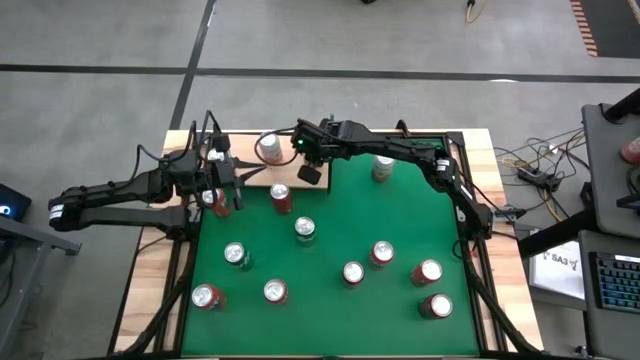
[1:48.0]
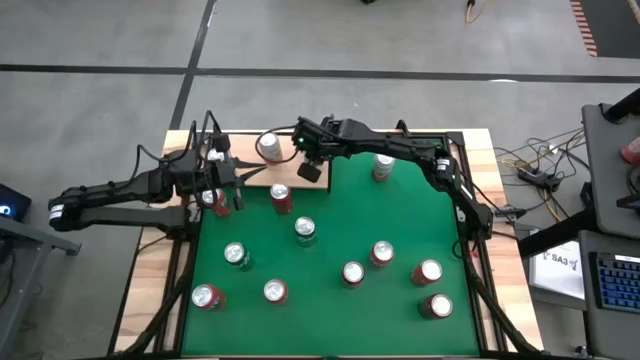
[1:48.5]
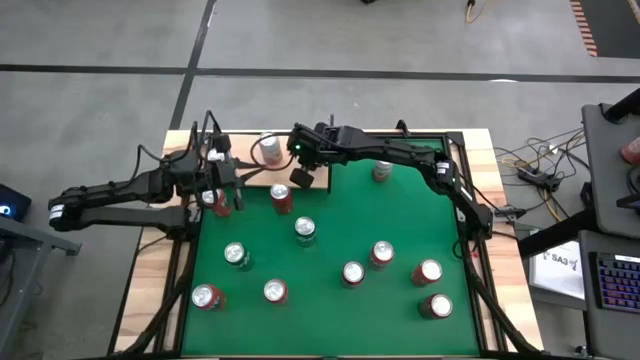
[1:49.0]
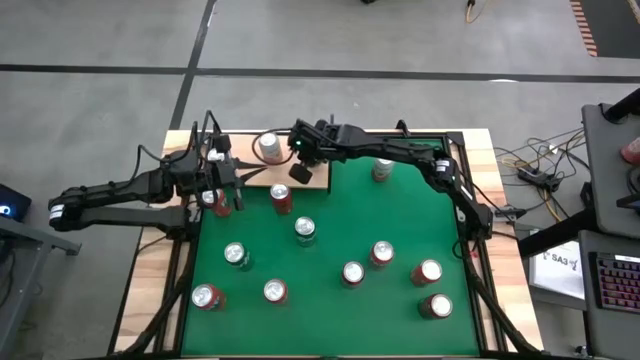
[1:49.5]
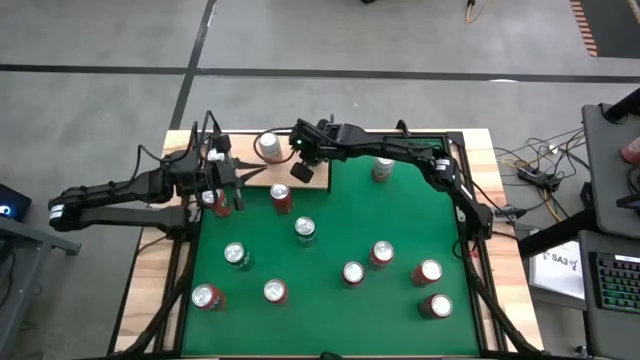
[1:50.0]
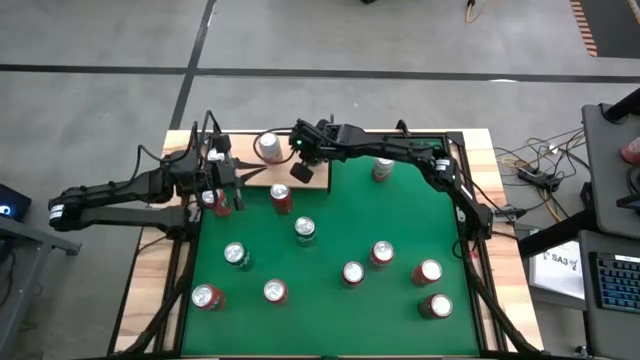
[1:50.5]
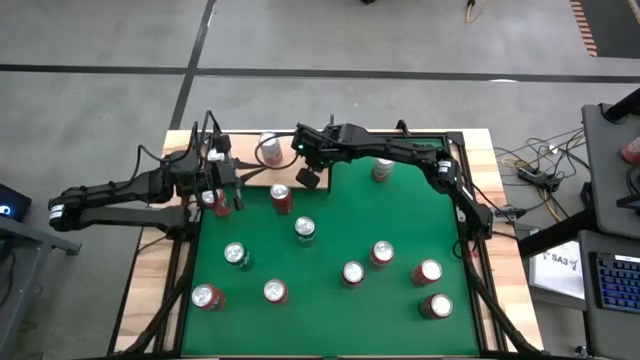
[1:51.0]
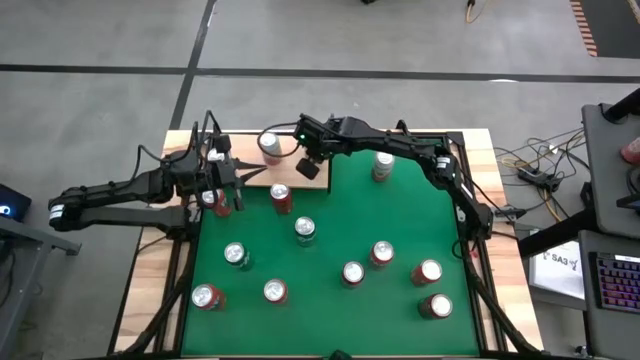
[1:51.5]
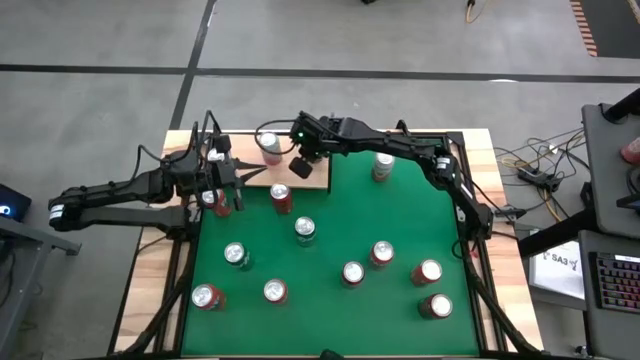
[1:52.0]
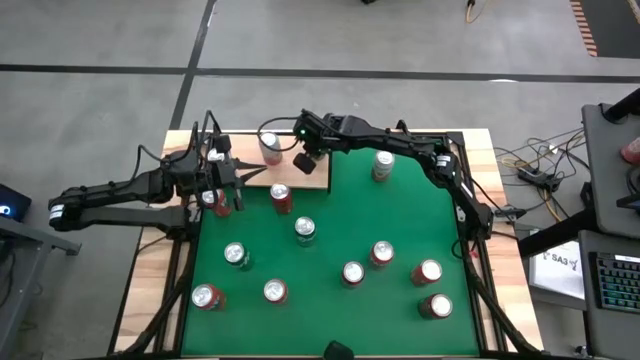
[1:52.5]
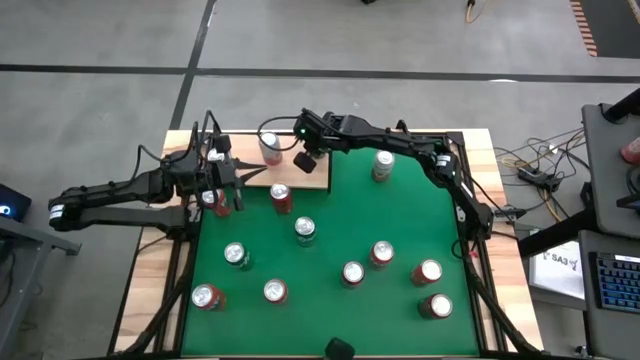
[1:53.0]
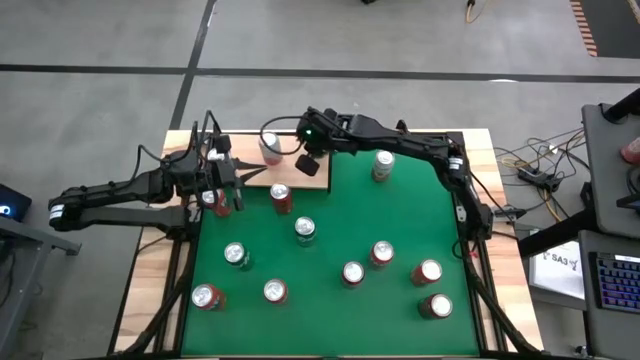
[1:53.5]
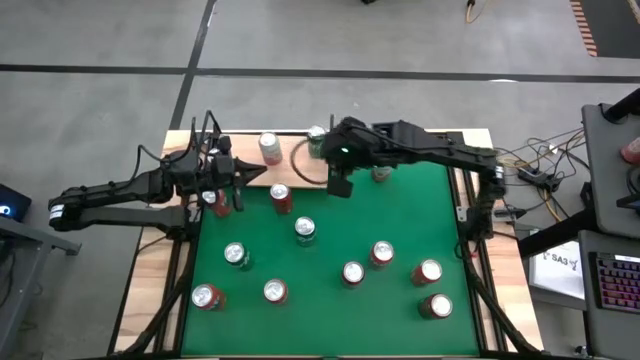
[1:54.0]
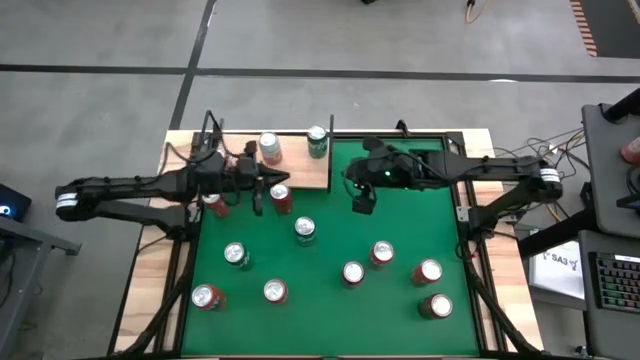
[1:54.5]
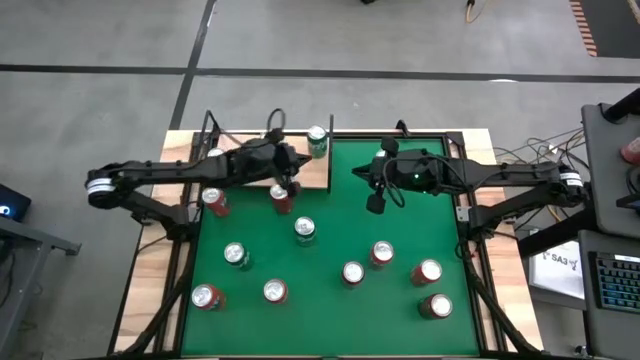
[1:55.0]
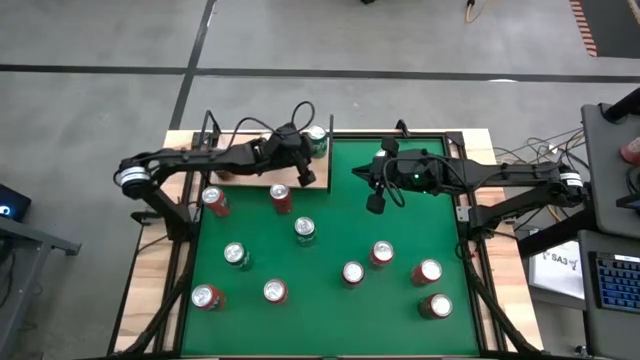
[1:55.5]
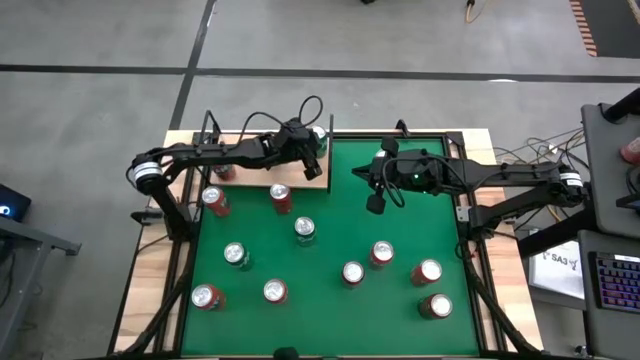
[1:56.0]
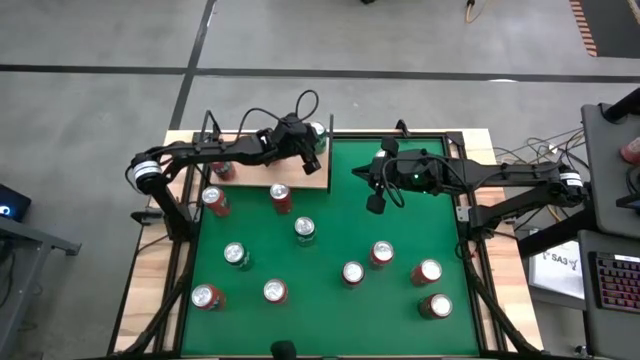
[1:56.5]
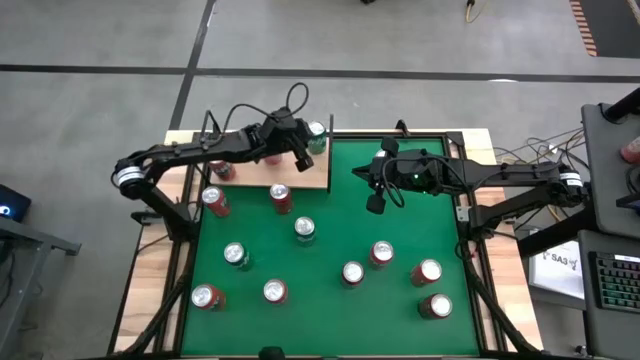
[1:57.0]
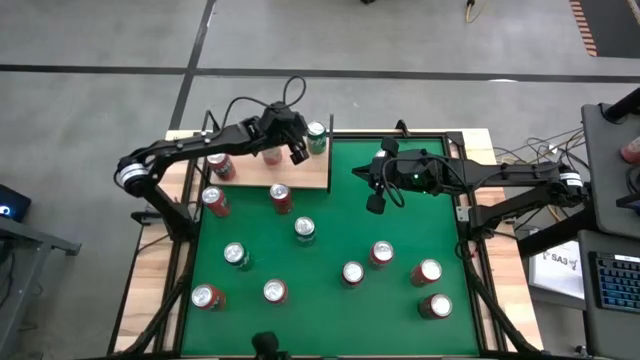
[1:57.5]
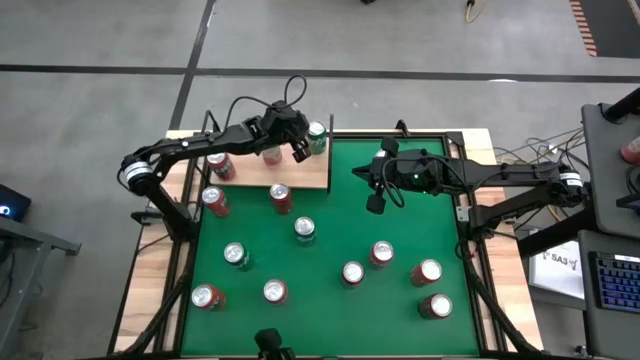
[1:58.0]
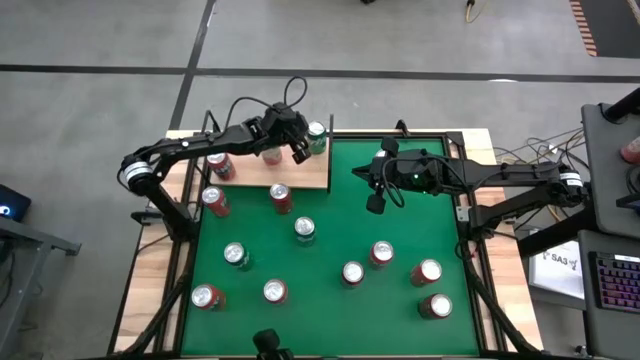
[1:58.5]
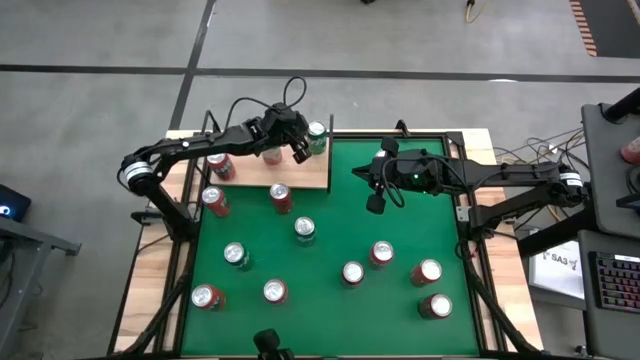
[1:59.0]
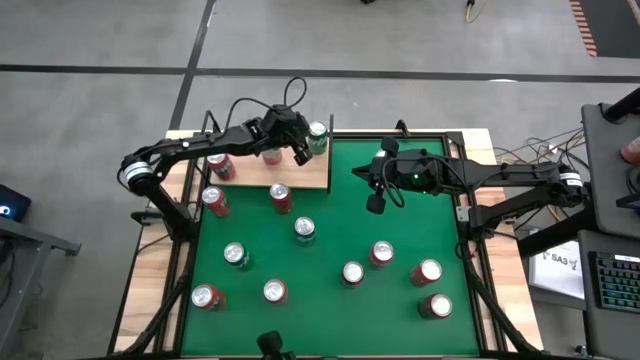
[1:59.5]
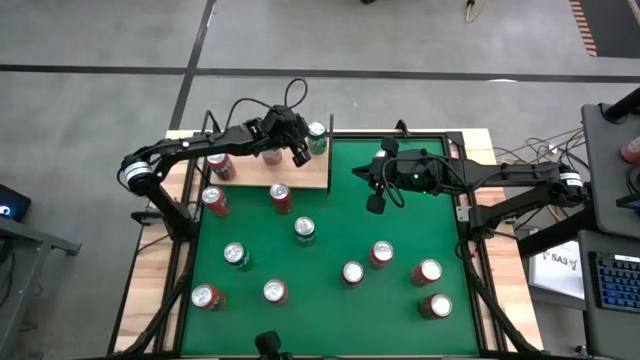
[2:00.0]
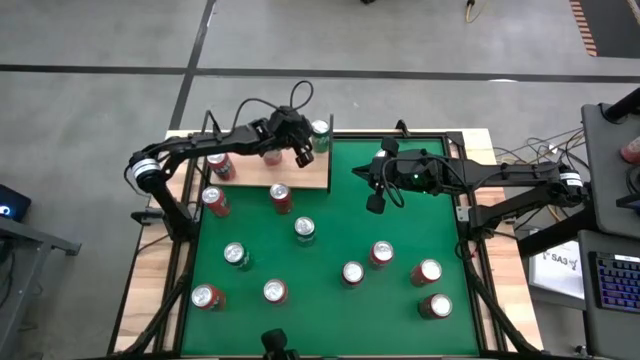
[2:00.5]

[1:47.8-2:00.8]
Task: Place canned beverage on shelf
Put the green soda can on the shelf

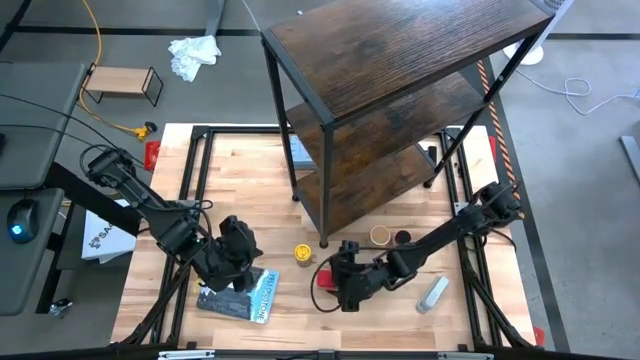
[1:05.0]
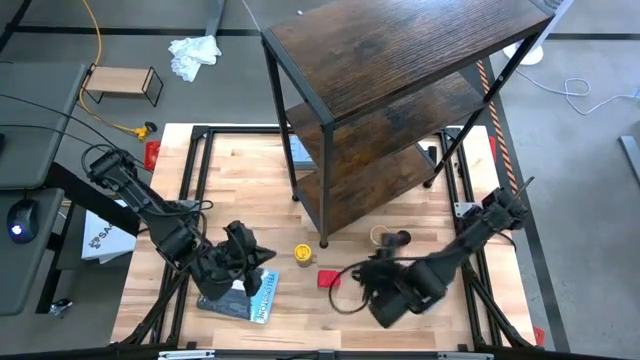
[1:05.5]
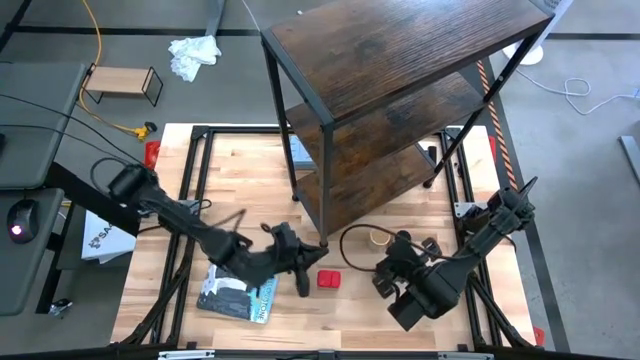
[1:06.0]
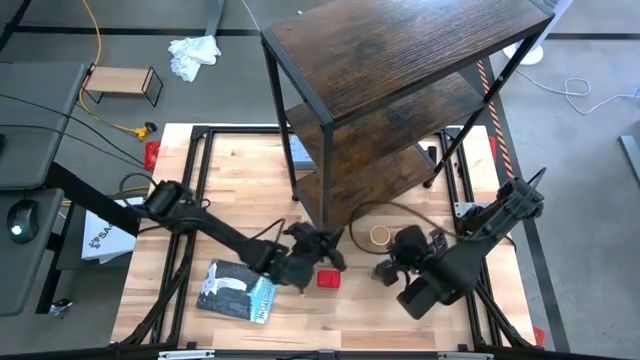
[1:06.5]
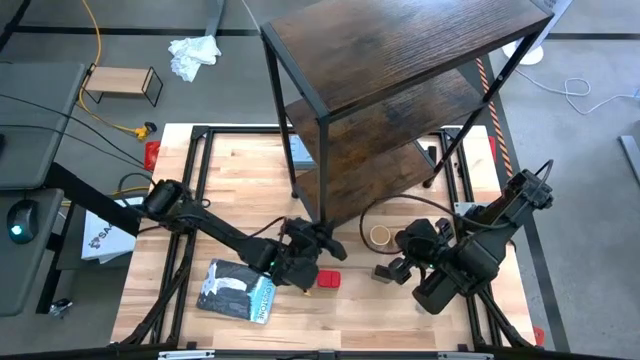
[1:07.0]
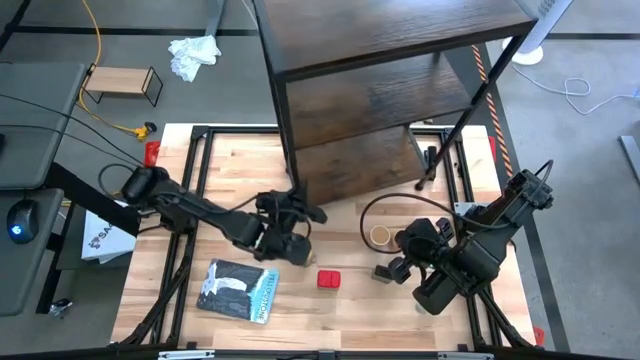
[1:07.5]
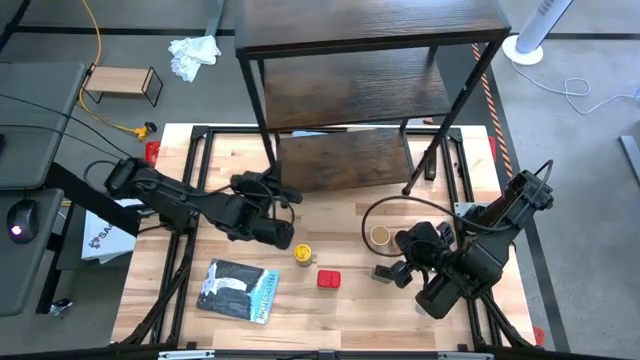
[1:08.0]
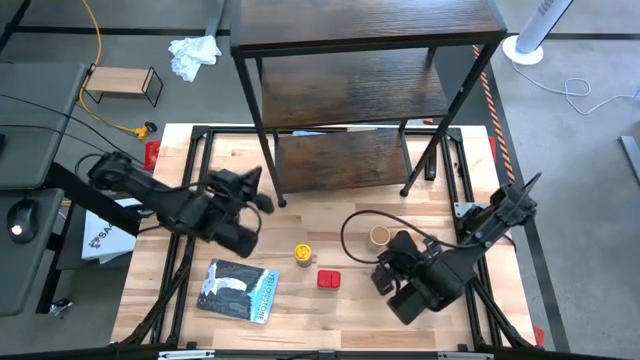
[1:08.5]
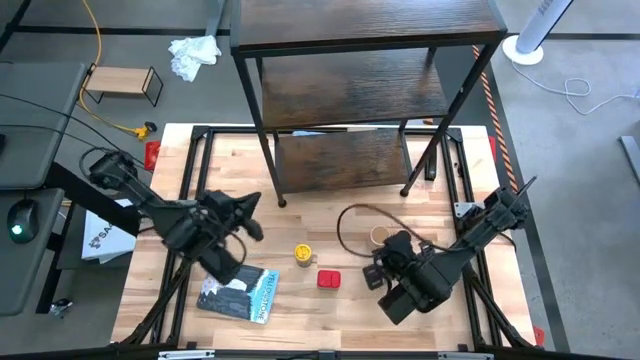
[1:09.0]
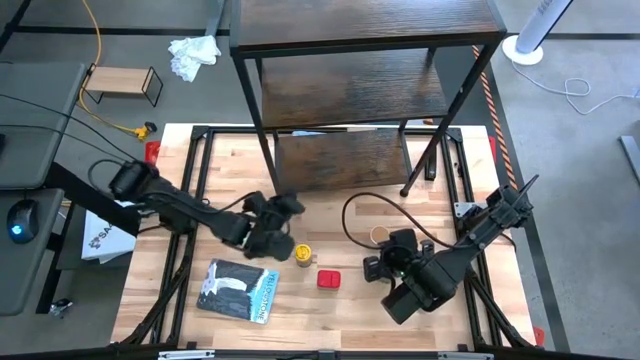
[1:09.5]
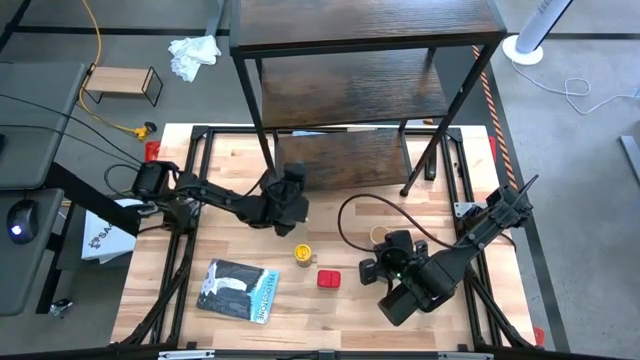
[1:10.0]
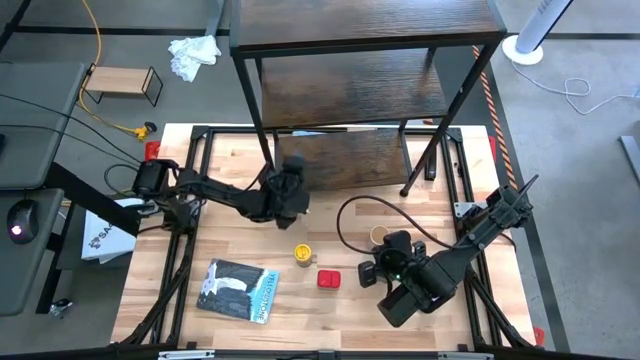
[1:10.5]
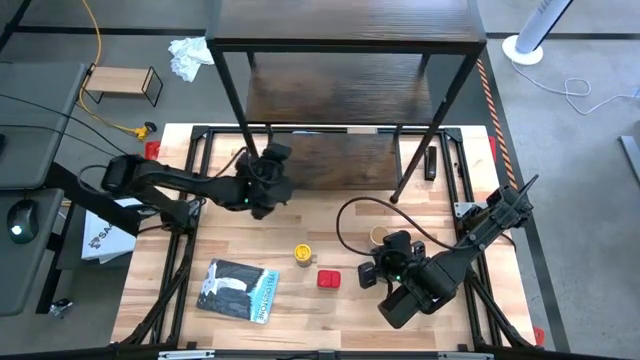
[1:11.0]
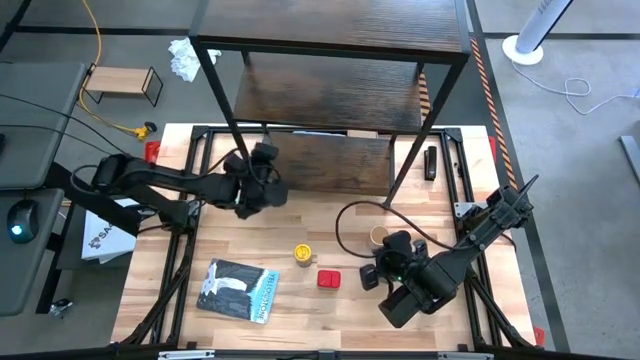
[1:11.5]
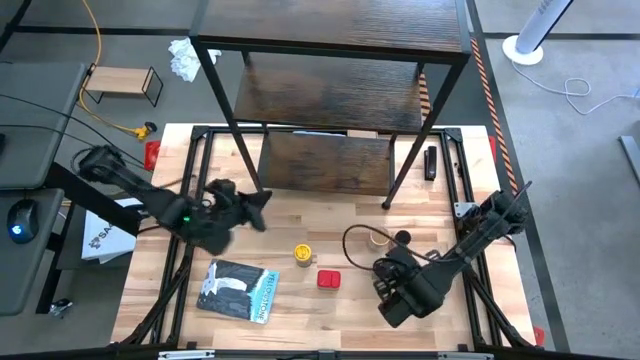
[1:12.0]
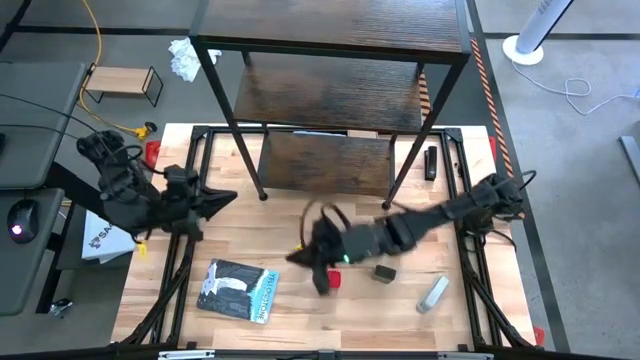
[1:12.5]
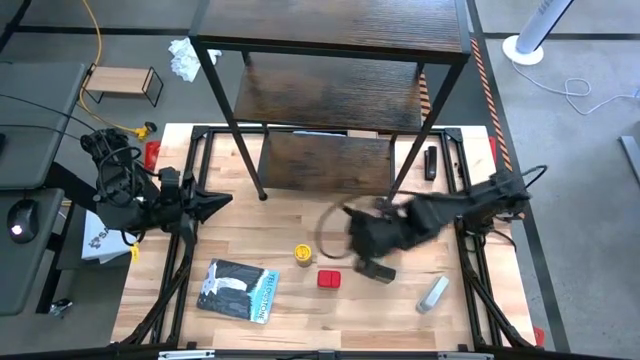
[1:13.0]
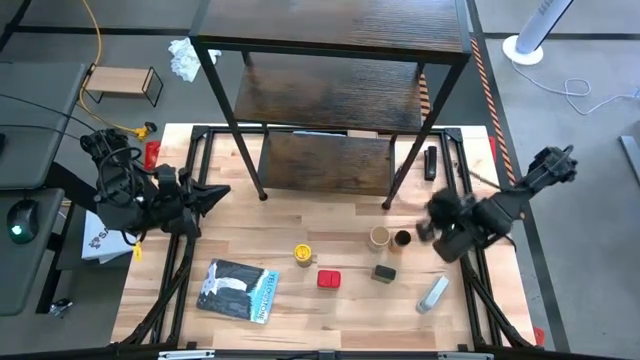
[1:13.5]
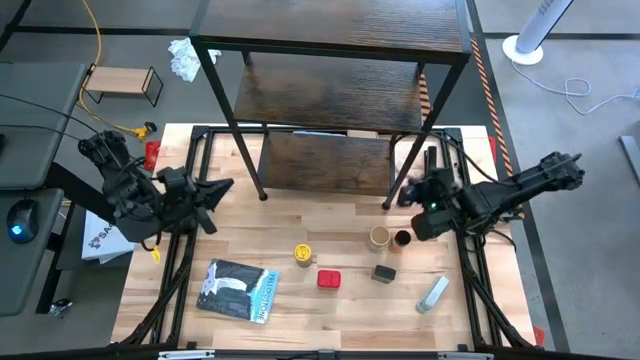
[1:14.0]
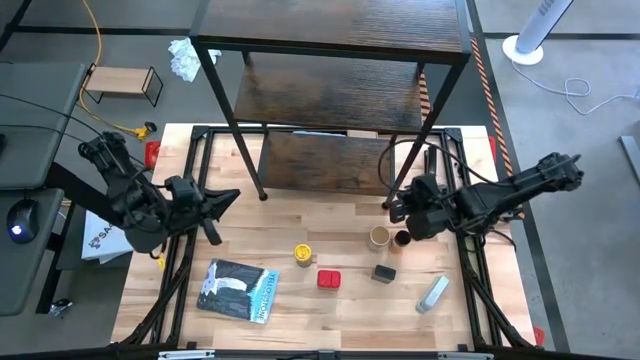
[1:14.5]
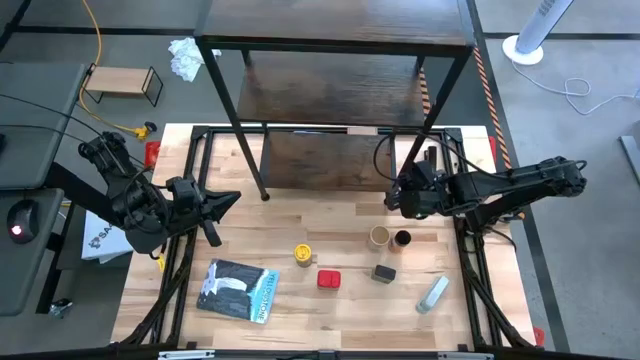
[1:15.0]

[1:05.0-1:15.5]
Task: Shelf spices
Adjust the shelf
